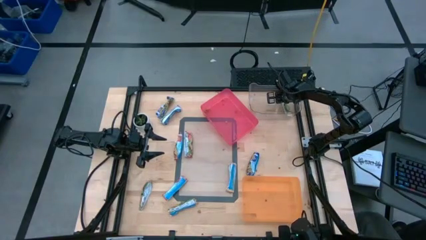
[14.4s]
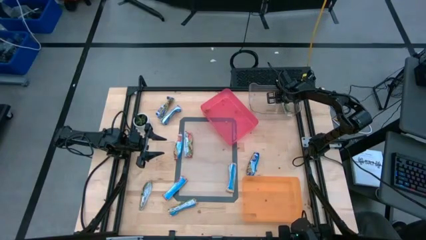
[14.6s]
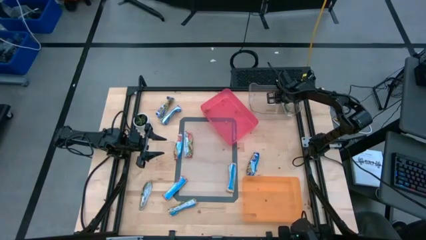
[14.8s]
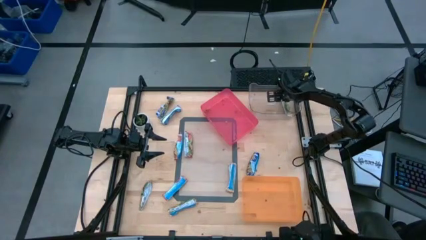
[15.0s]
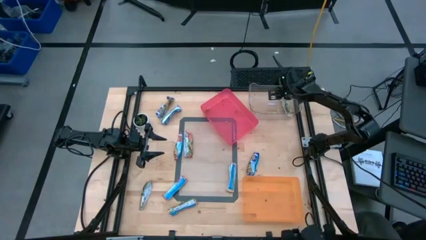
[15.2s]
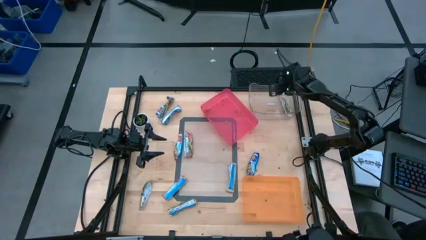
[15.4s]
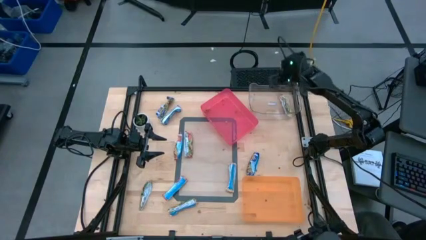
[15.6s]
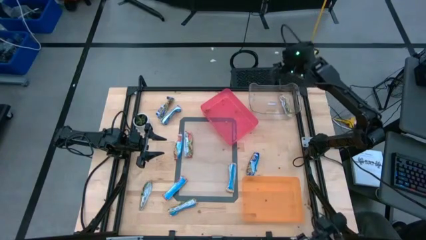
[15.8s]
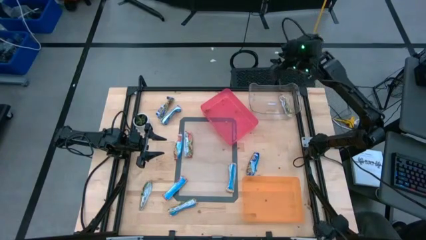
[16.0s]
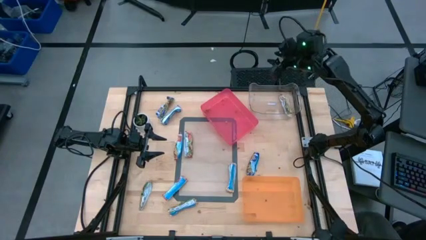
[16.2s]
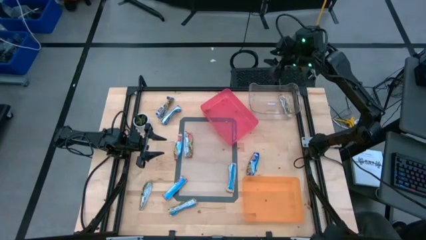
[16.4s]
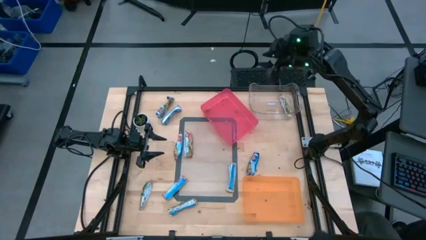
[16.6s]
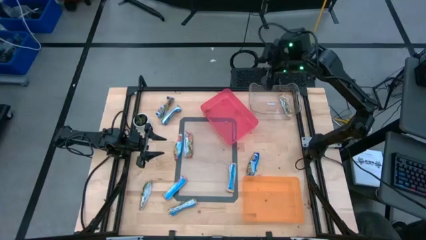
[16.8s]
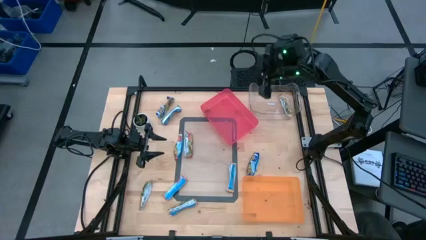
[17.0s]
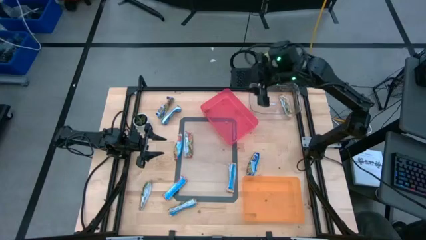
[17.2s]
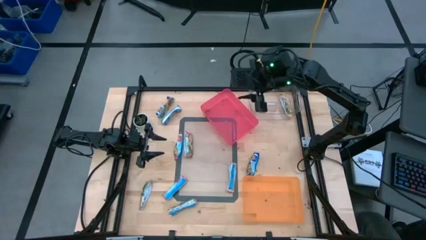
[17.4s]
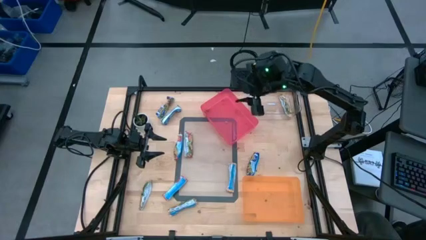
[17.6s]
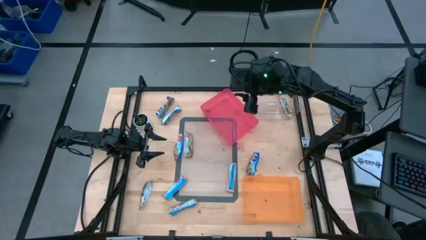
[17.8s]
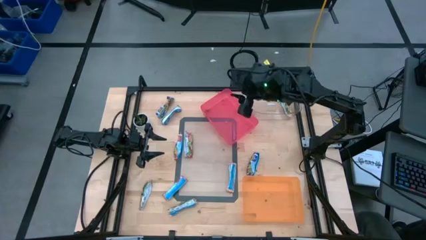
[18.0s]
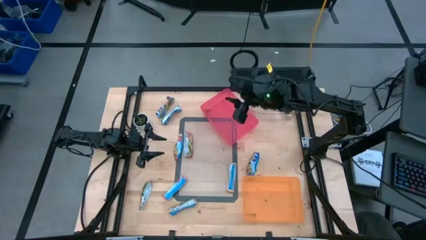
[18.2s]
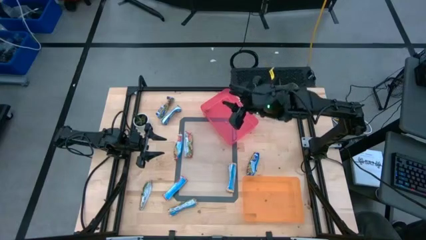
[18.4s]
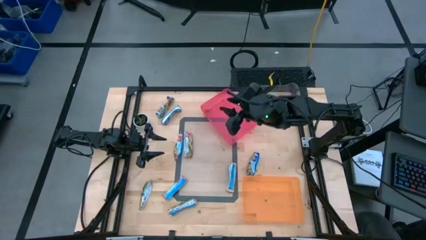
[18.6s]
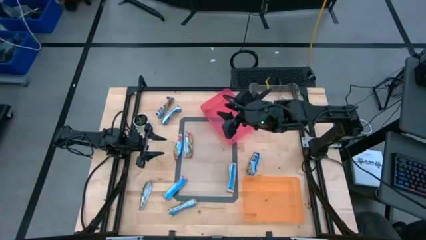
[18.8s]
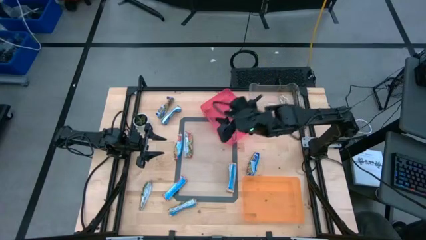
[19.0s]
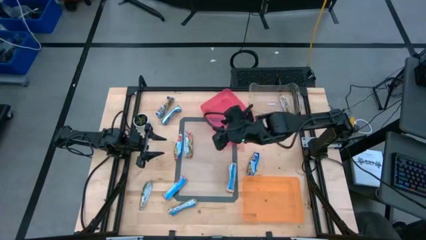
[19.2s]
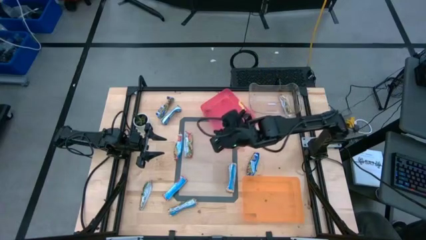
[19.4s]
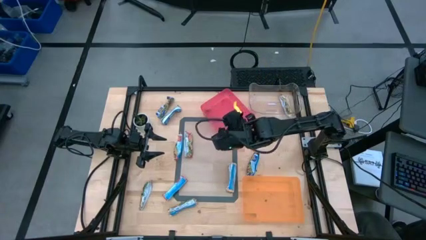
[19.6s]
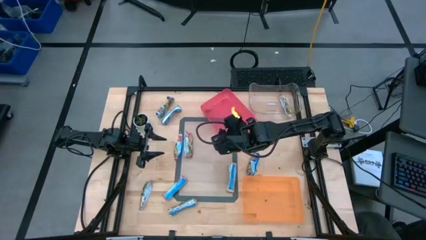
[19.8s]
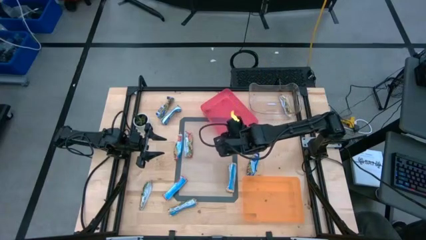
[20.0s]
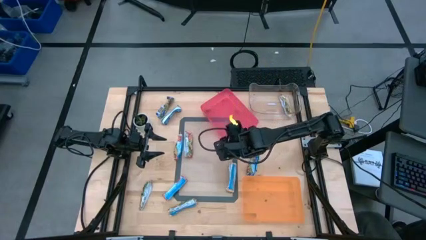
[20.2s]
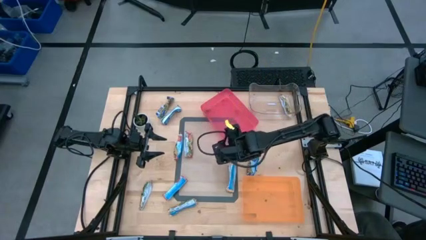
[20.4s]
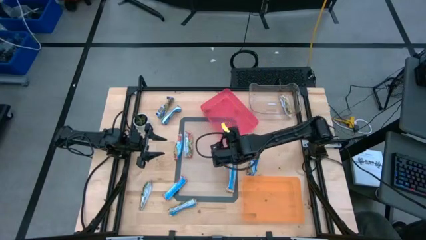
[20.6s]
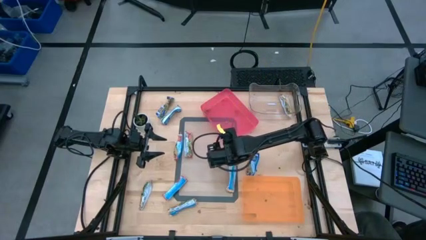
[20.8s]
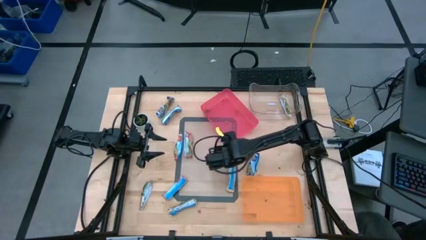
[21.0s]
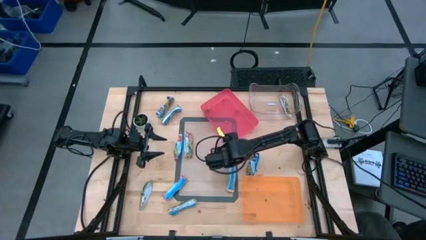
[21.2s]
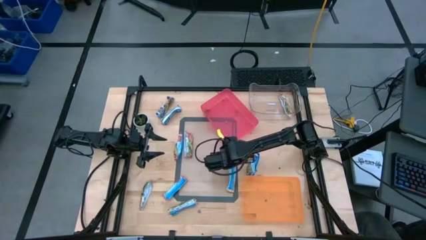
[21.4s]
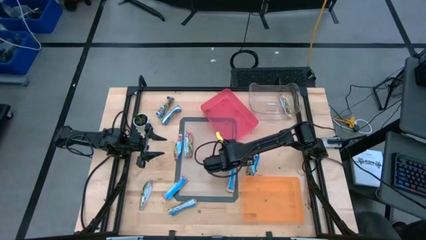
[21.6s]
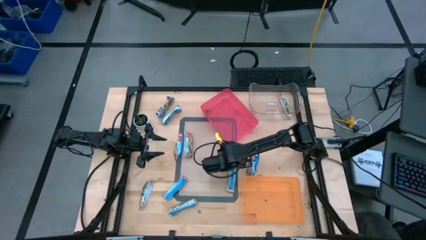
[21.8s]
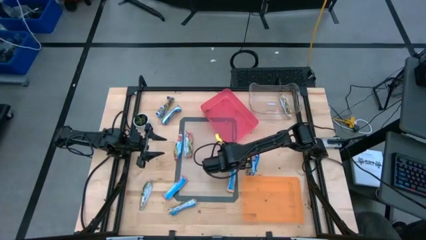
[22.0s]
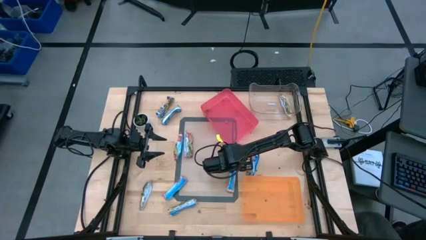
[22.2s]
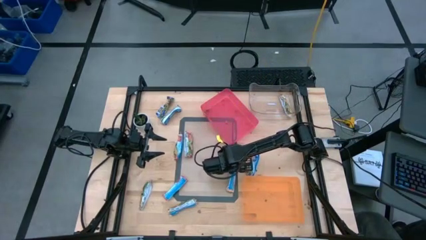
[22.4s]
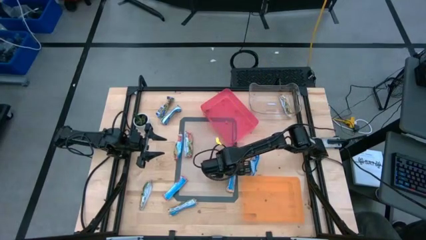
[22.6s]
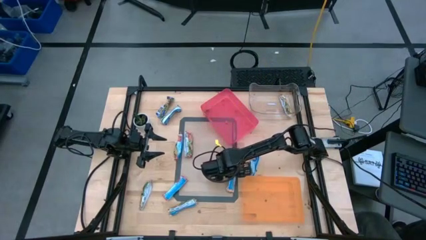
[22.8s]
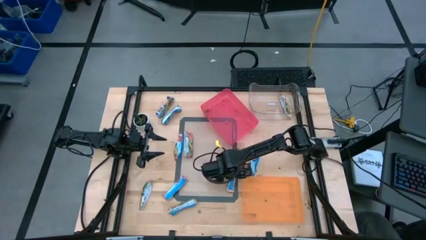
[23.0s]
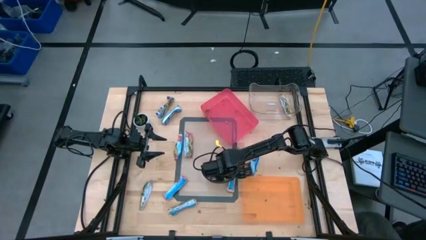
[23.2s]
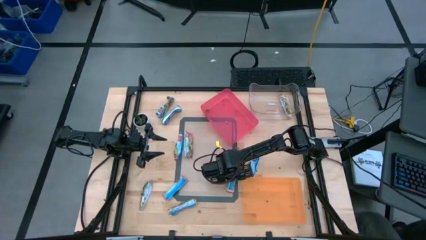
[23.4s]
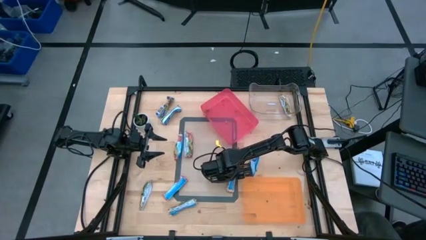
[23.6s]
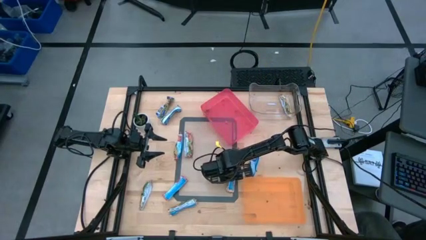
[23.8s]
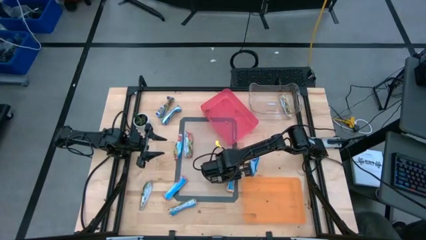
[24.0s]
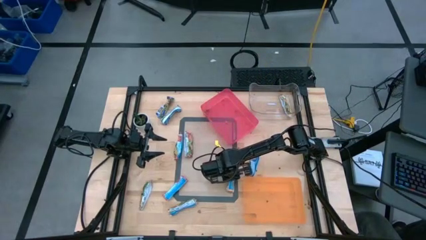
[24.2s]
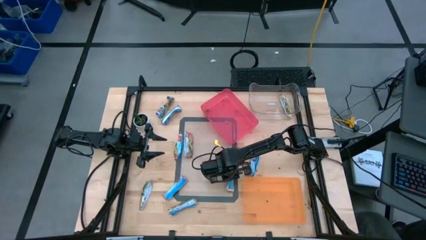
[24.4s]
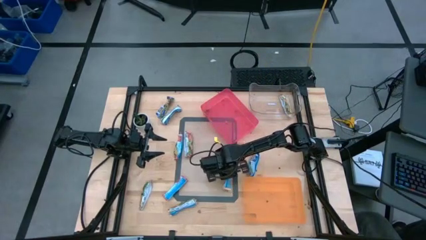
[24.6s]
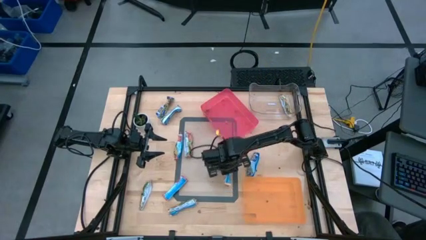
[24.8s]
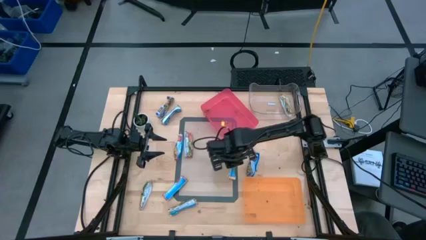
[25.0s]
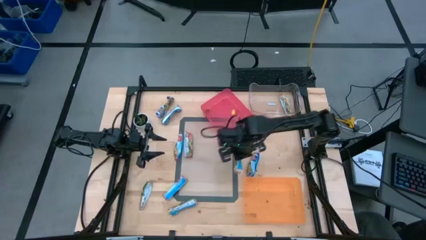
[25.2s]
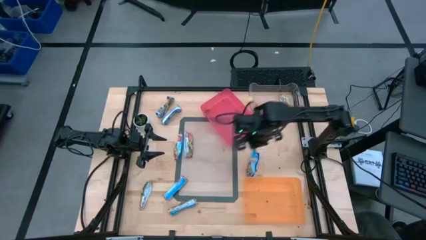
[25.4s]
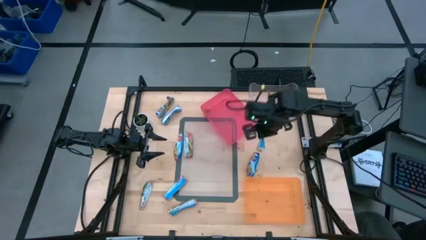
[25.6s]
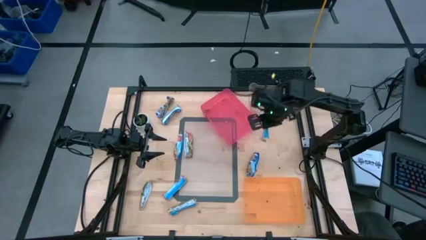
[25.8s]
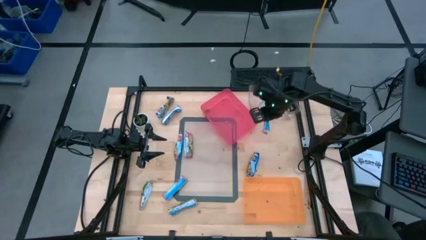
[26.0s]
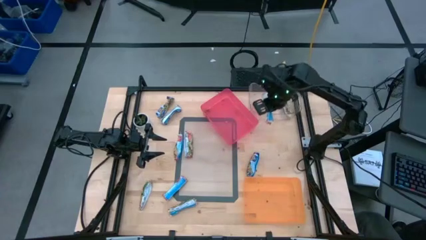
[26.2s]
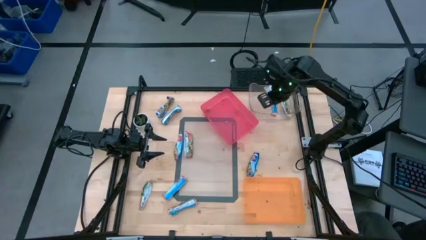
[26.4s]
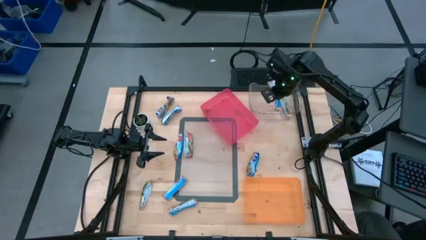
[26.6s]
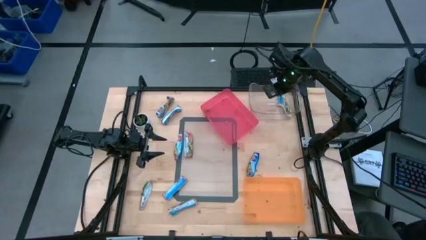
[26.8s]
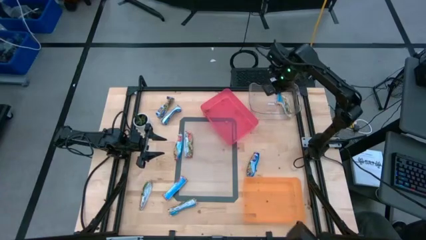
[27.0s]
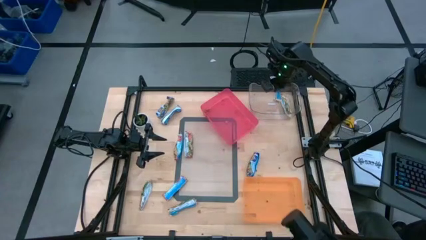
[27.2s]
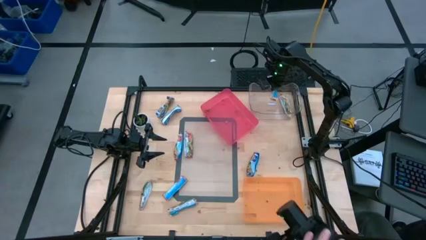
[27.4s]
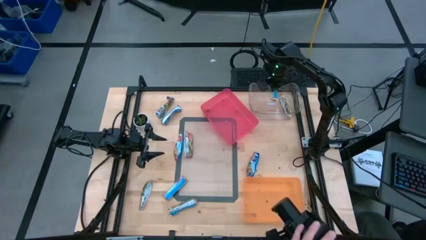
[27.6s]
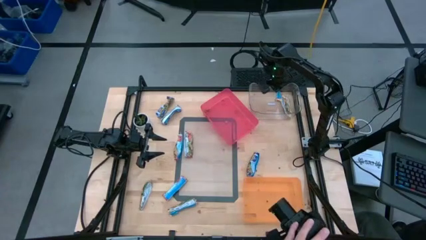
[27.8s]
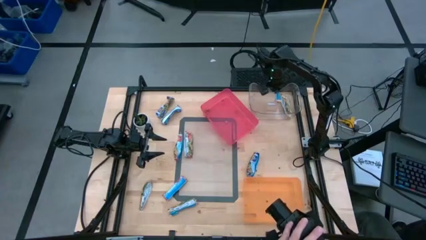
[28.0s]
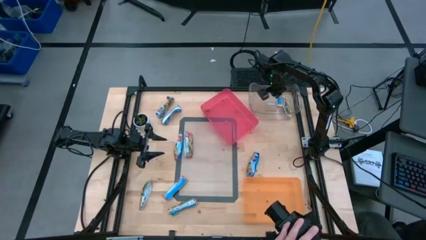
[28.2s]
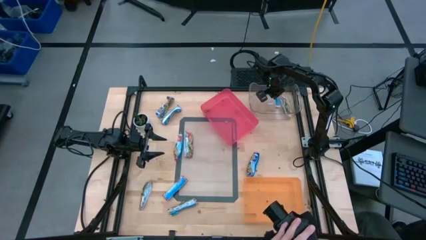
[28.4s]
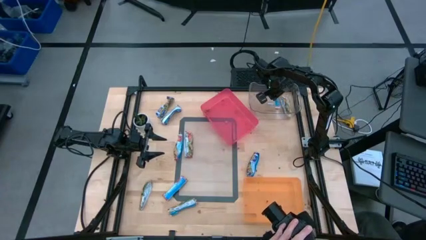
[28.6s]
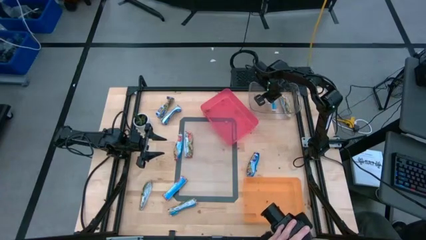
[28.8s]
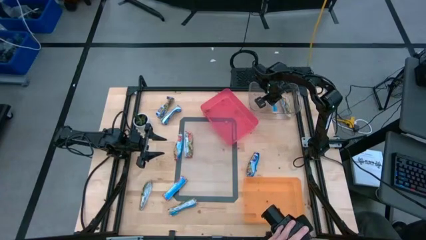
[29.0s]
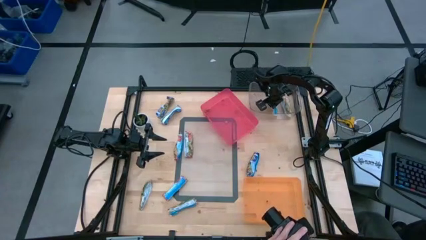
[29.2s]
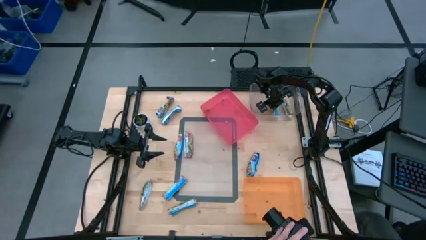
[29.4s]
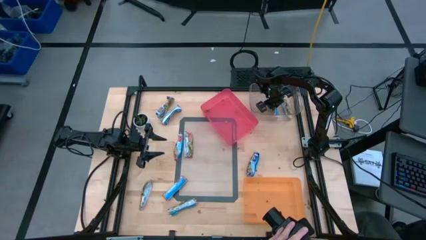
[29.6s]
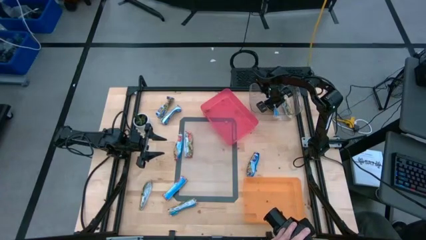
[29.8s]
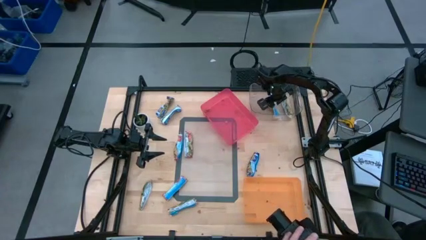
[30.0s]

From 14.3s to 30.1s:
Task: Pick and place Granola Bars by type
Put the yellow granola bar into the transparent bin
